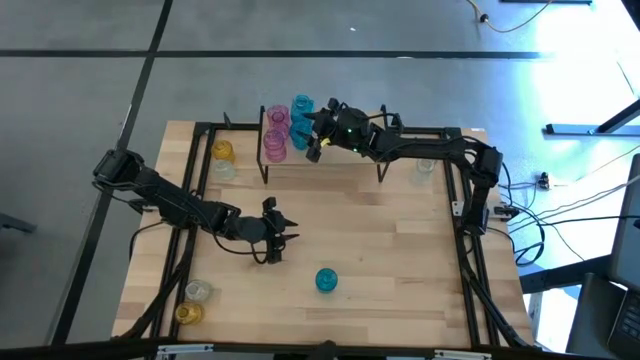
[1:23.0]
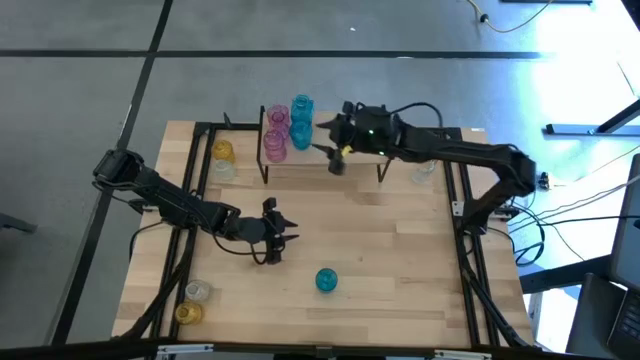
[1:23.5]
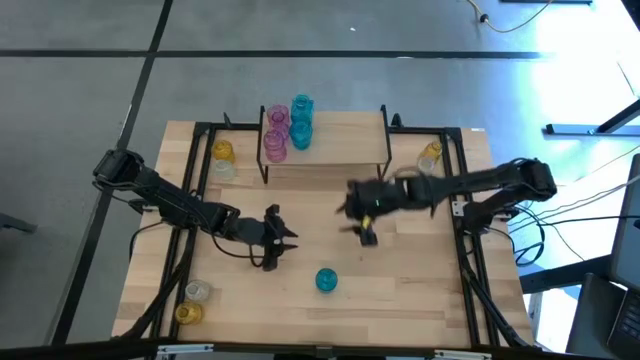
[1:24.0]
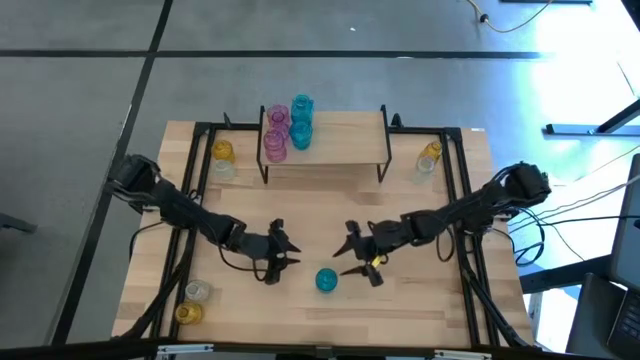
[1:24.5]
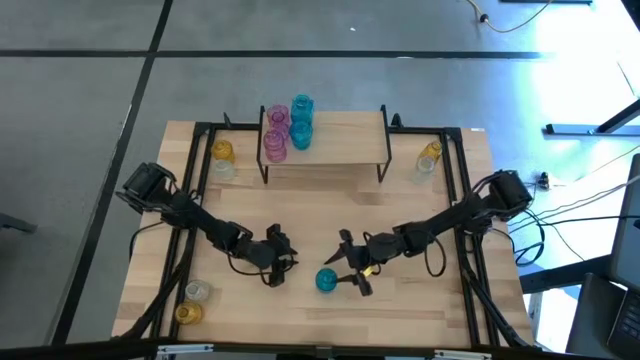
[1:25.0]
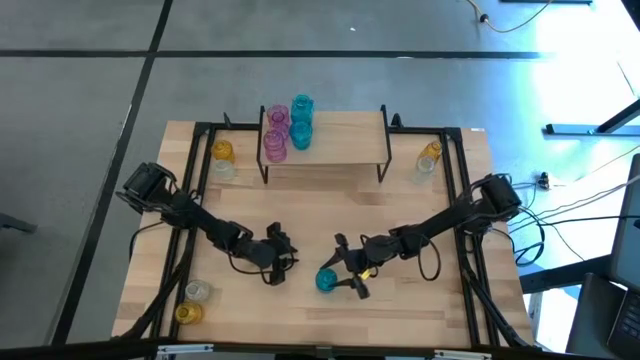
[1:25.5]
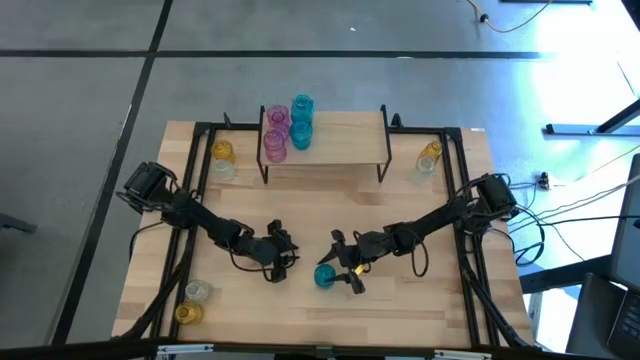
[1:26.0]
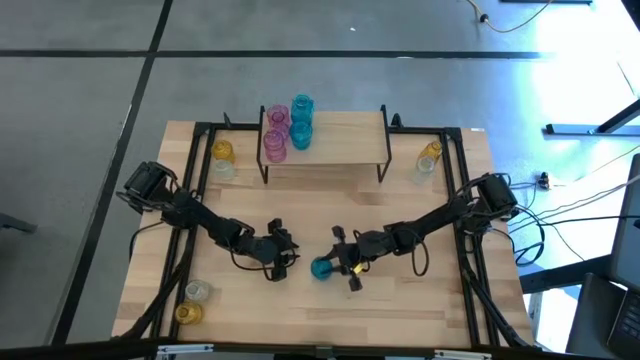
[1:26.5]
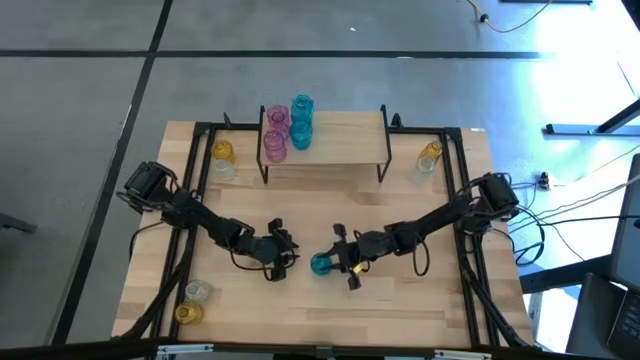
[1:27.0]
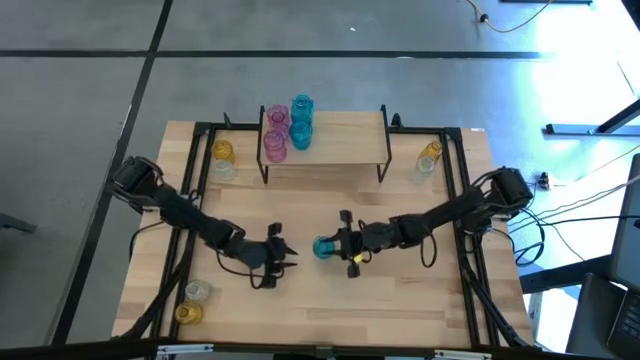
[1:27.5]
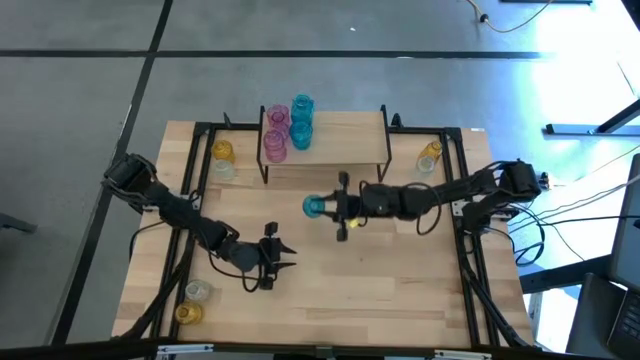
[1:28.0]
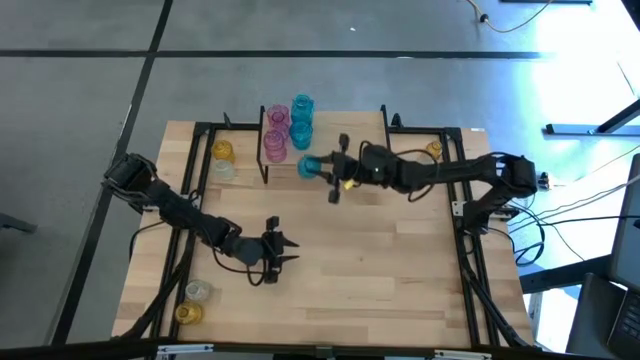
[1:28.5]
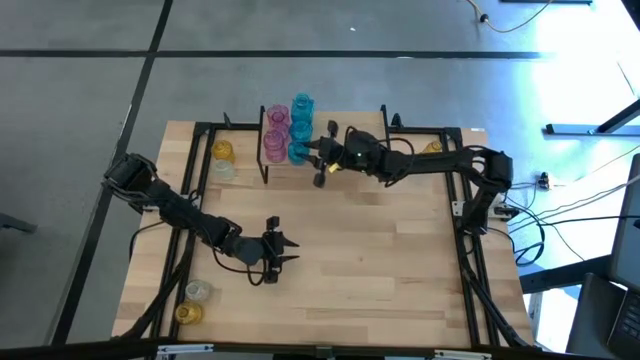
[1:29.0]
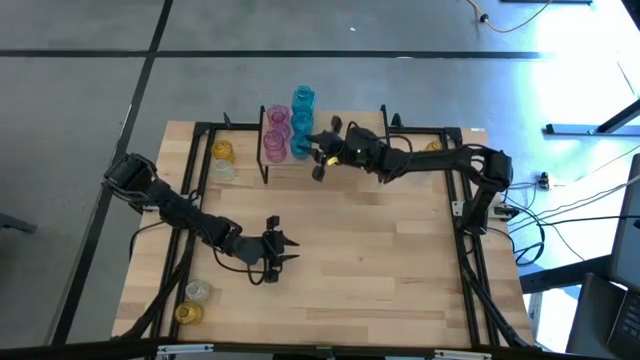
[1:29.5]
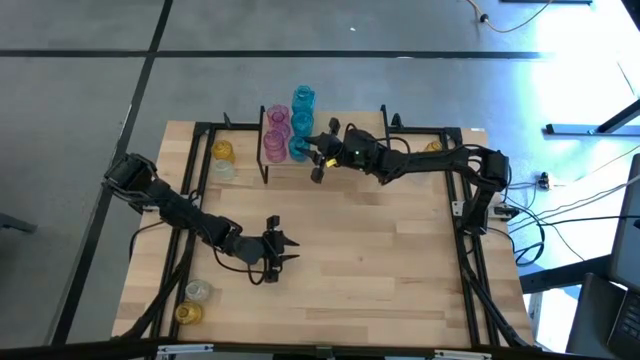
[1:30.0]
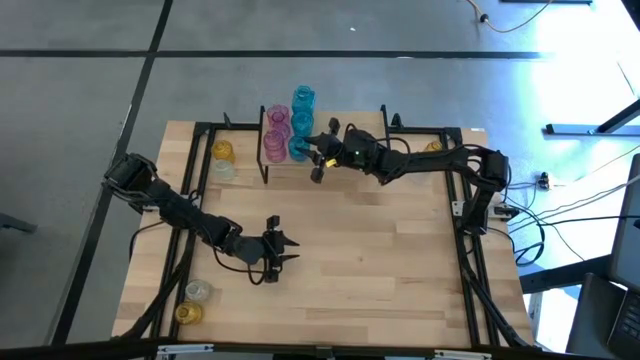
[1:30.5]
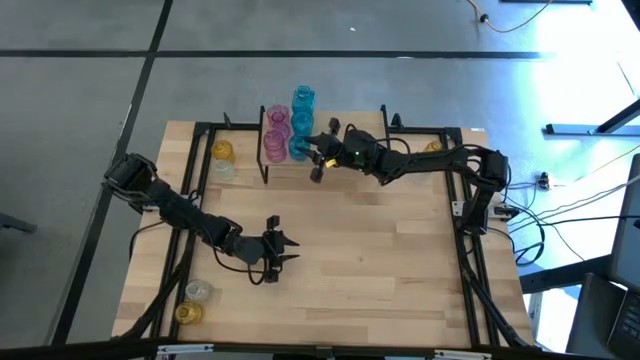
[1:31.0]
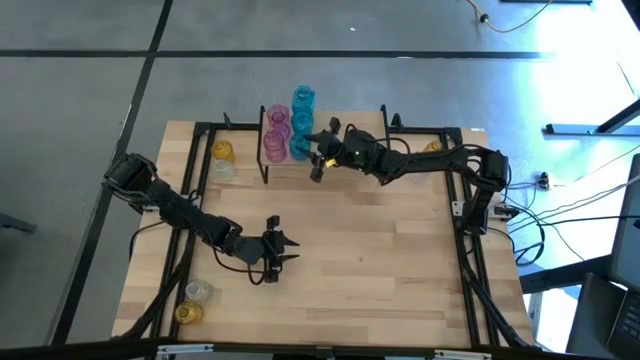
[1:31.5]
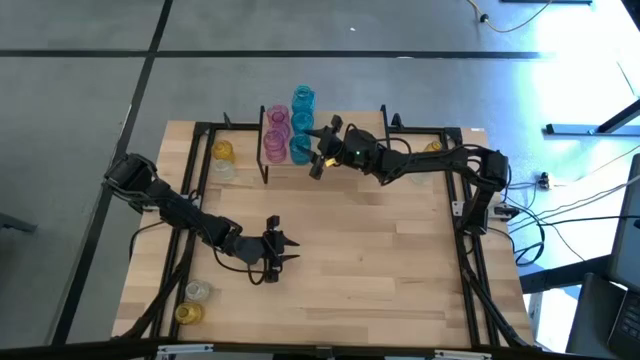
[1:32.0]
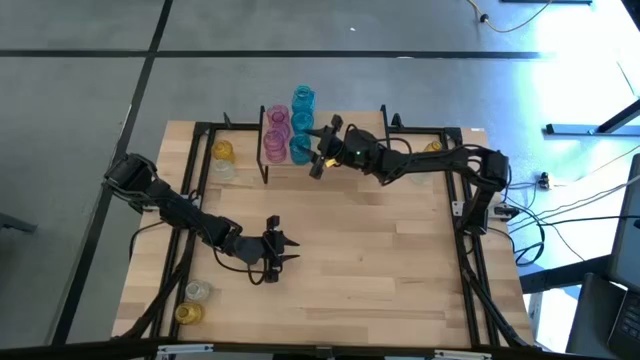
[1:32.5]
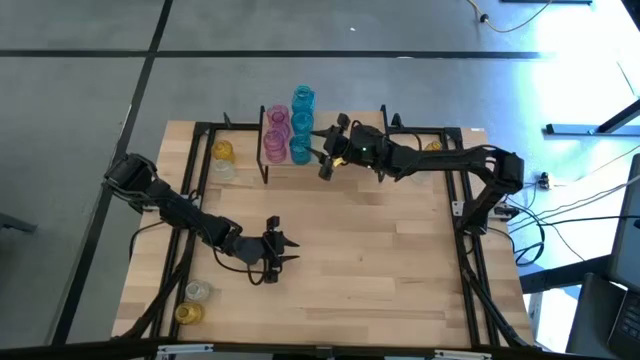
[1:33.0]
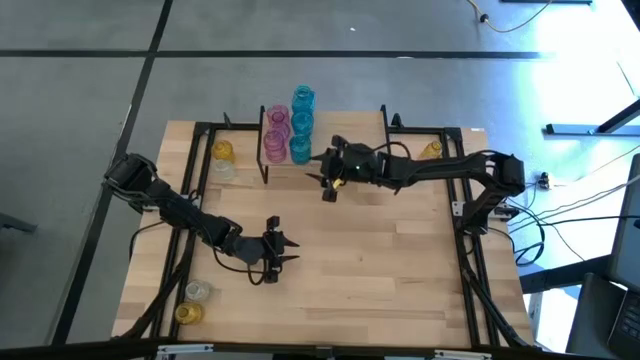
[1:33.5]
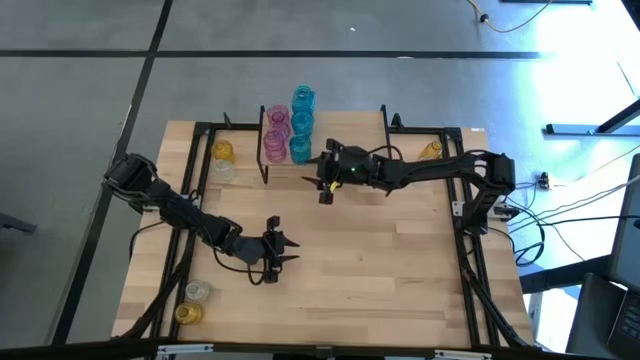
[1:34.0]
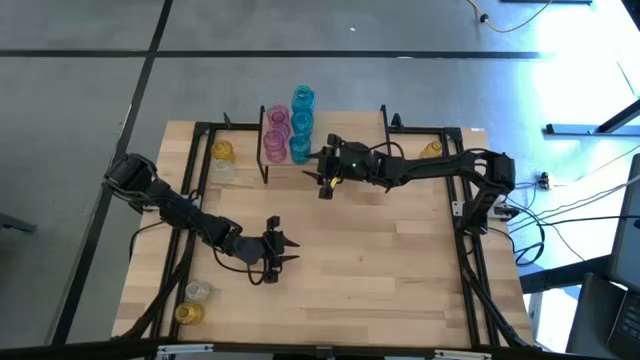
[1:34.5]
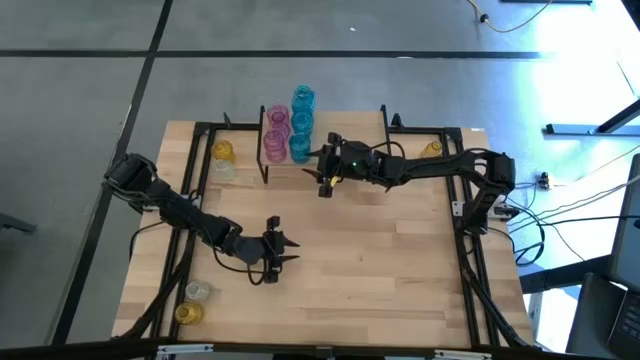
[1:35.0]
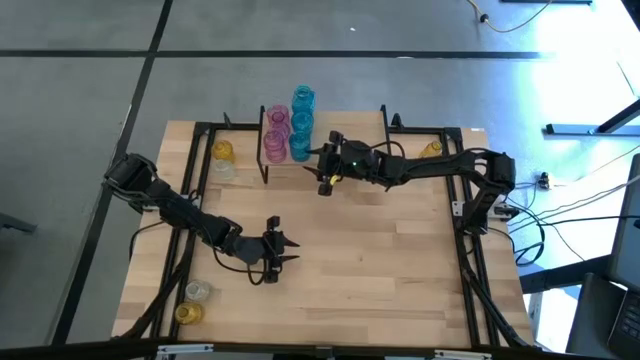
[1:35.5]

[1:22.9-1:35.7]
Task: sort vases onto shelf
Put the blue flower vase on the shelf aligned with the other blue flower vase

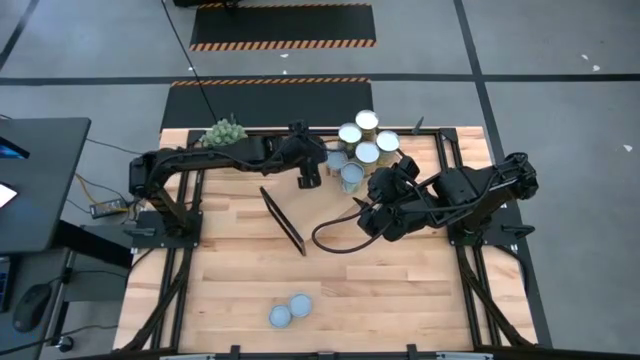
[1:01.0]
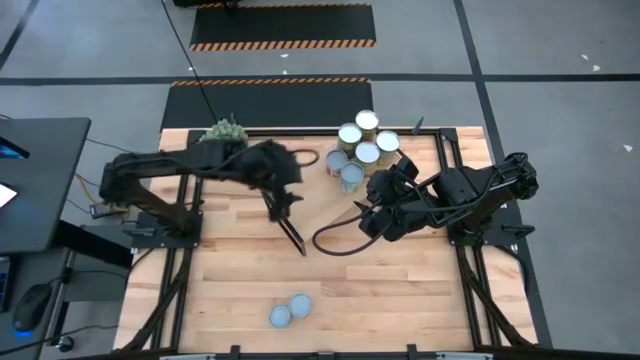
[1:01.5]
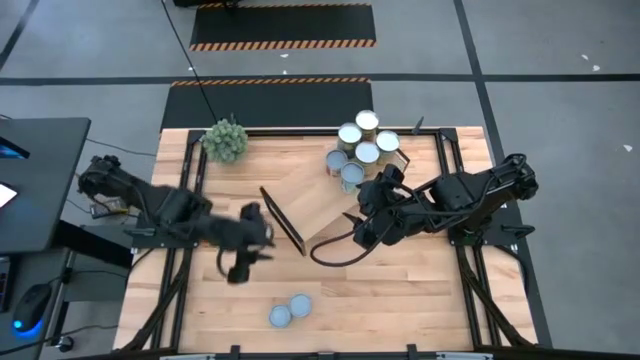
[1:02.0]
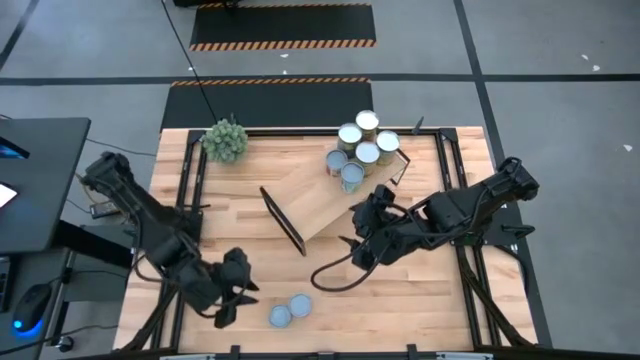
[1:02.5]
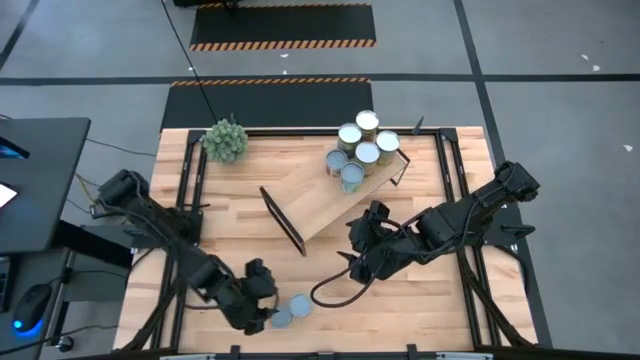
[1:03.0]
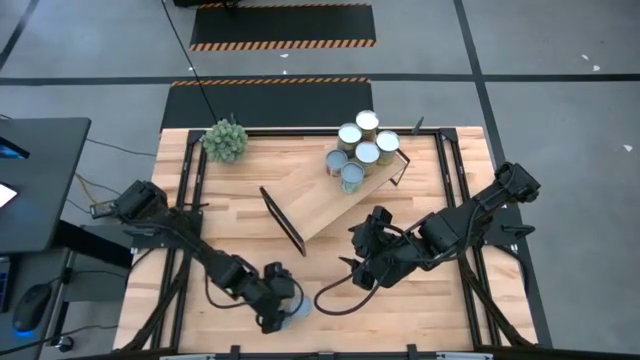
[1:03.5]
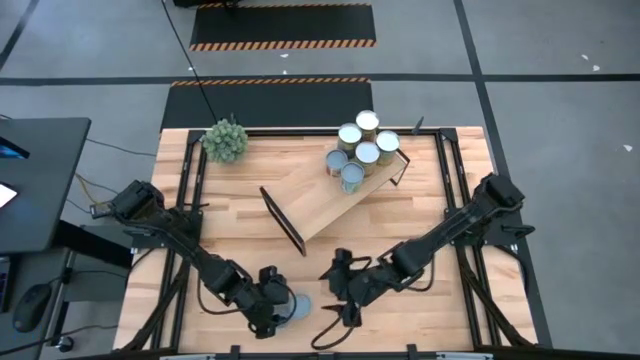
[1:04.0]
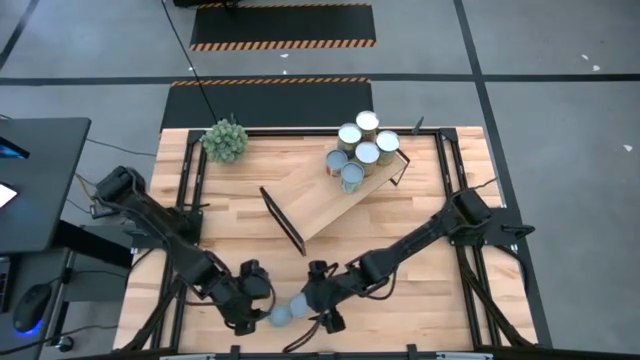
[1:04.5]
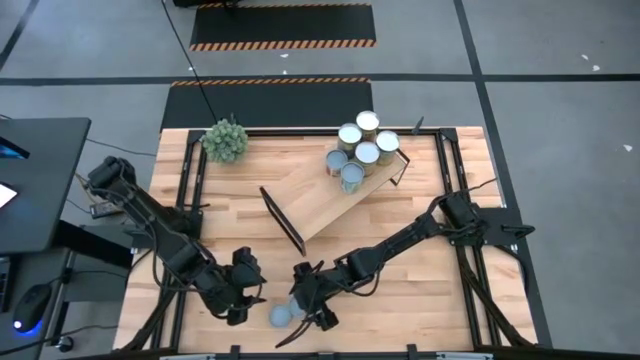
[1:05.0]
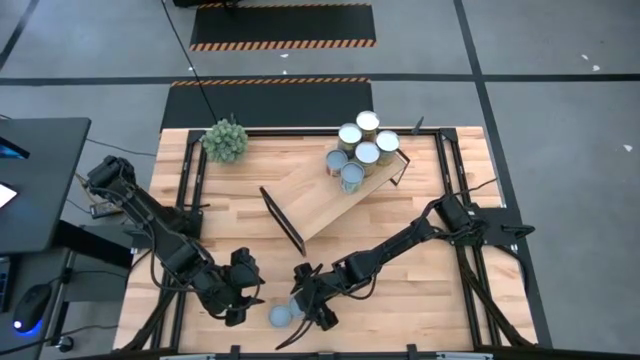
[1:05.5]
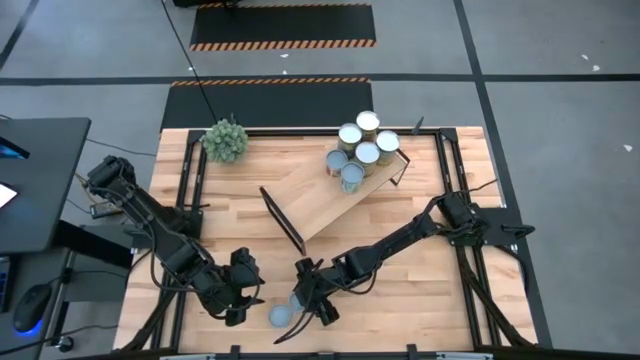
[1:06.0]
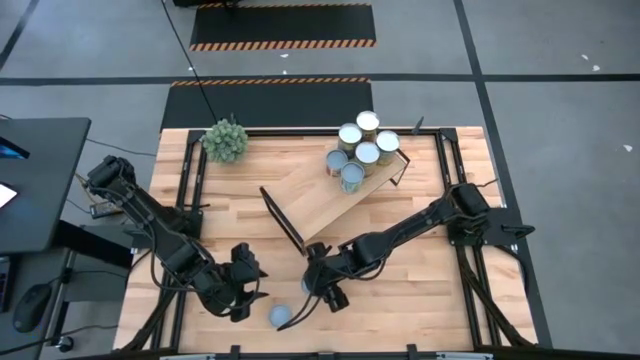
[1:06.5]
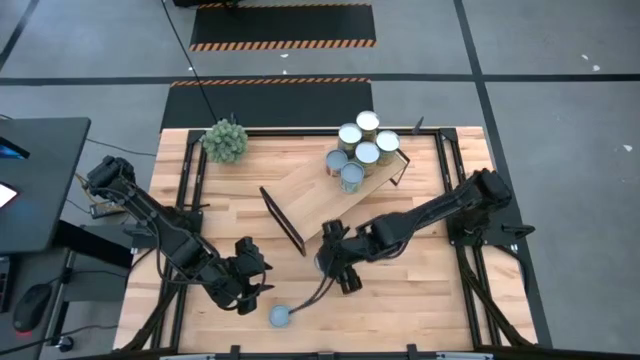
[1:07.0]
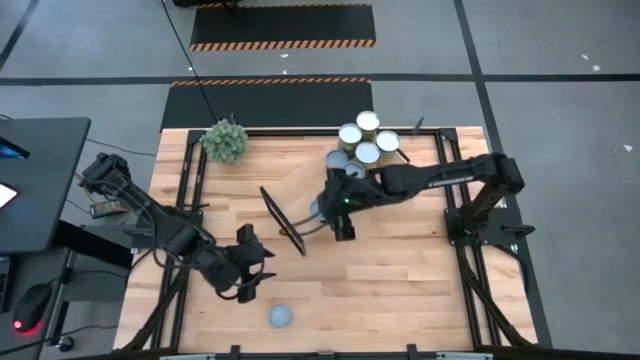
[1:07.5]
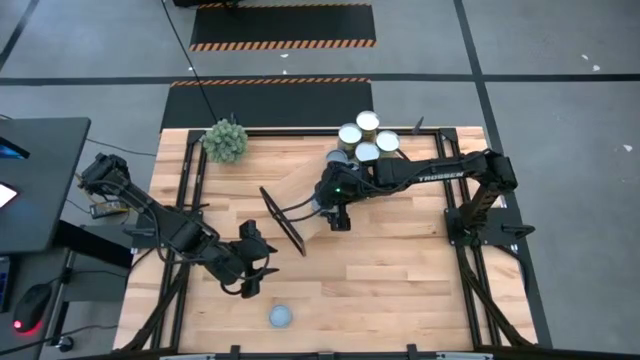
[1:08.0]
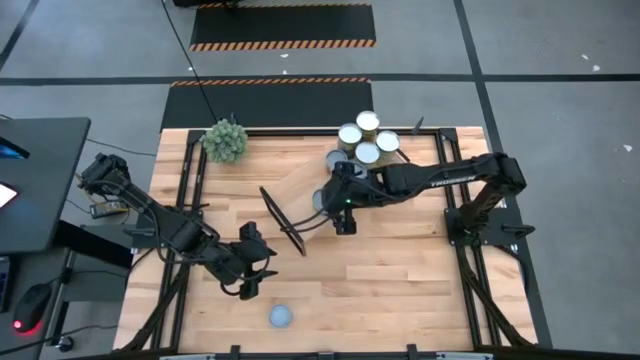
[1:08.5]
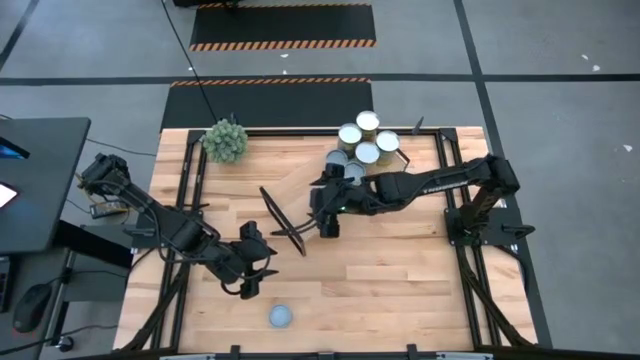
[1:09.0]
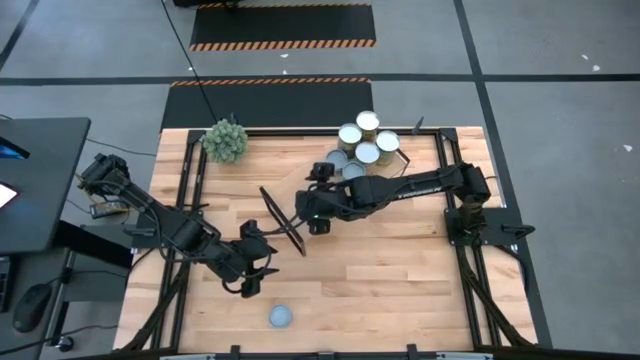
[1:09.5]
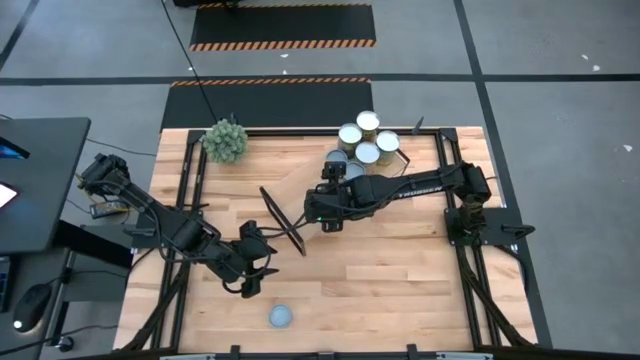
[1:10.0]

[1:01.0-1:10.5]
Task: Pick and place cans onto a shelf
Put the canned green peas on the shelf
